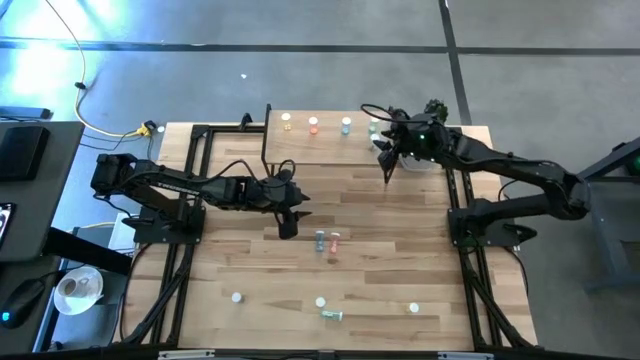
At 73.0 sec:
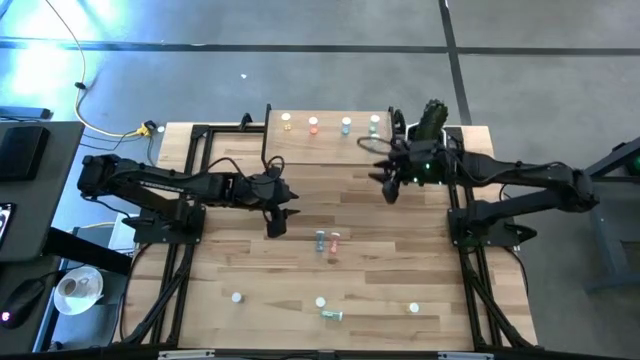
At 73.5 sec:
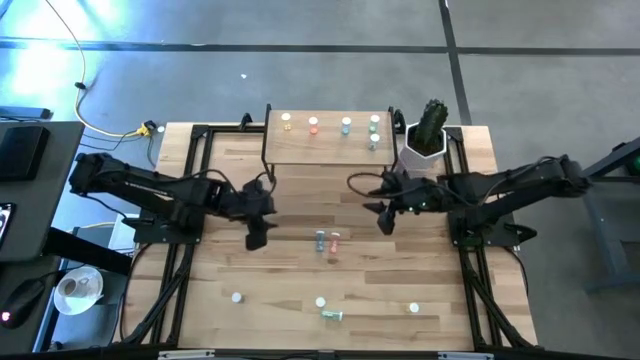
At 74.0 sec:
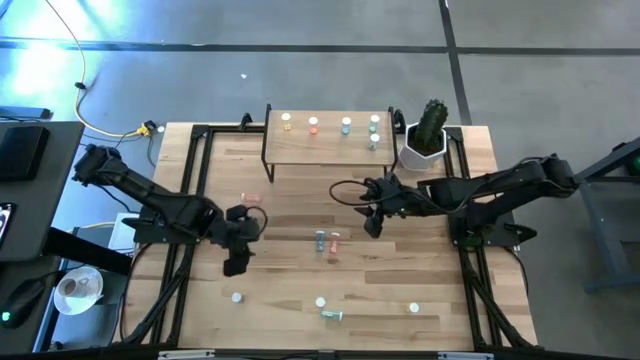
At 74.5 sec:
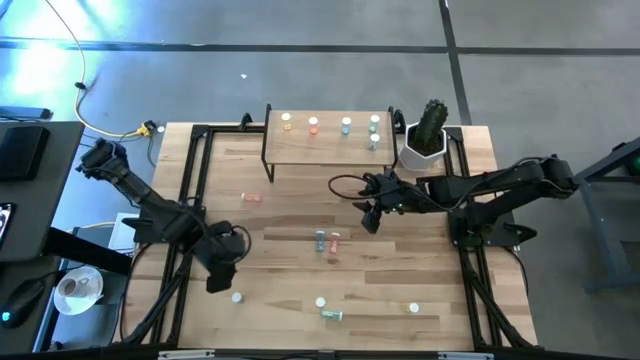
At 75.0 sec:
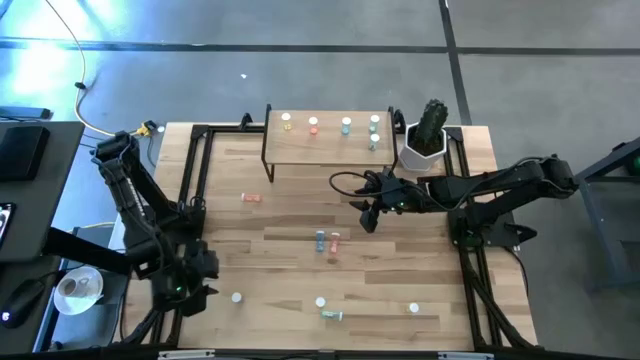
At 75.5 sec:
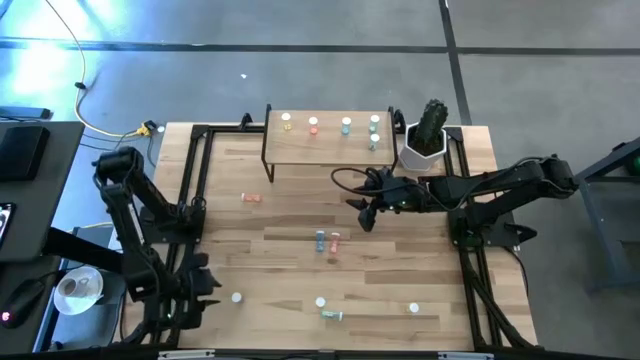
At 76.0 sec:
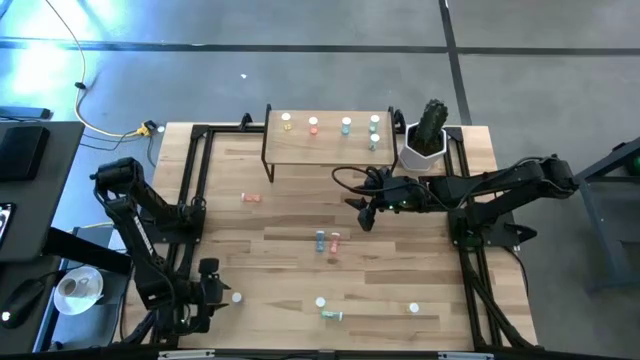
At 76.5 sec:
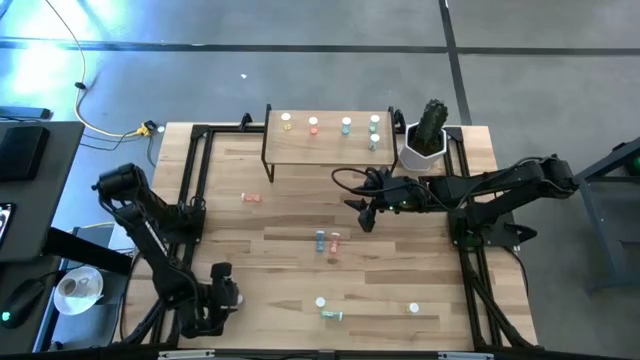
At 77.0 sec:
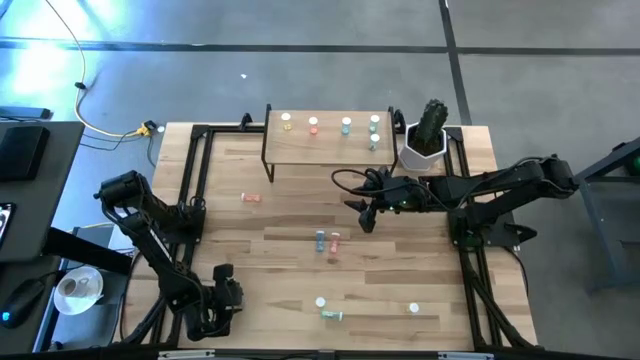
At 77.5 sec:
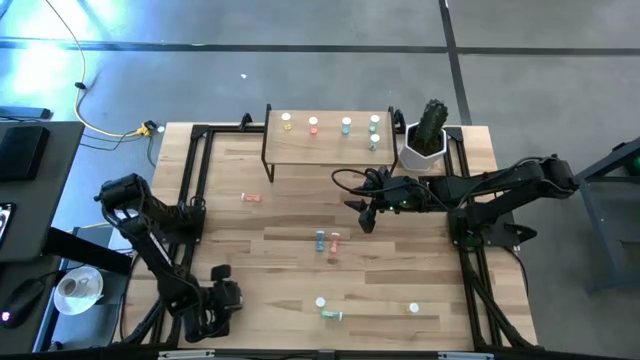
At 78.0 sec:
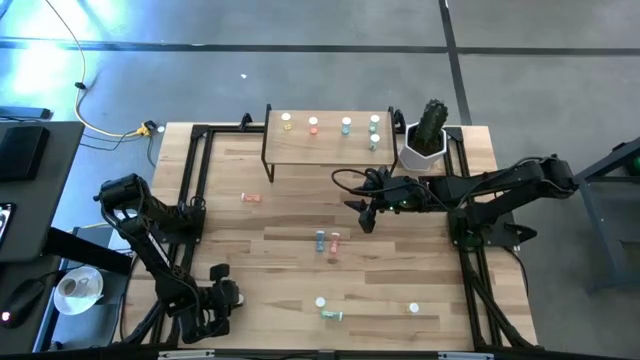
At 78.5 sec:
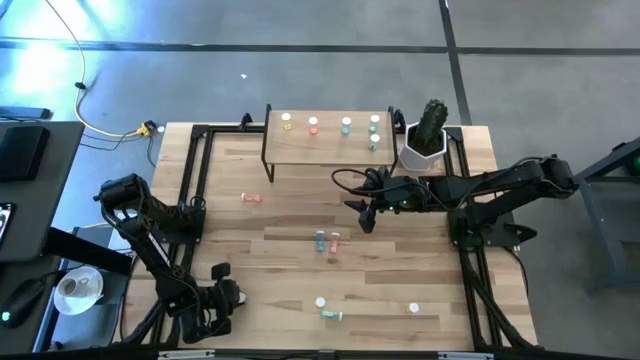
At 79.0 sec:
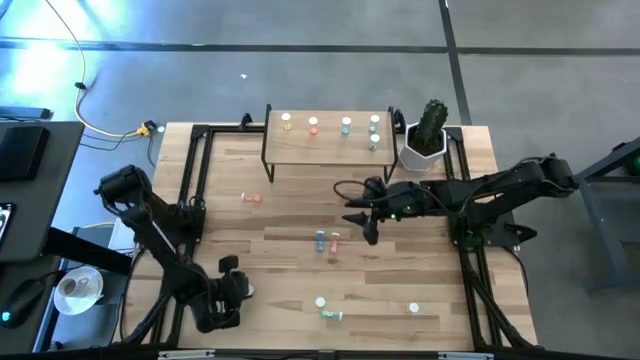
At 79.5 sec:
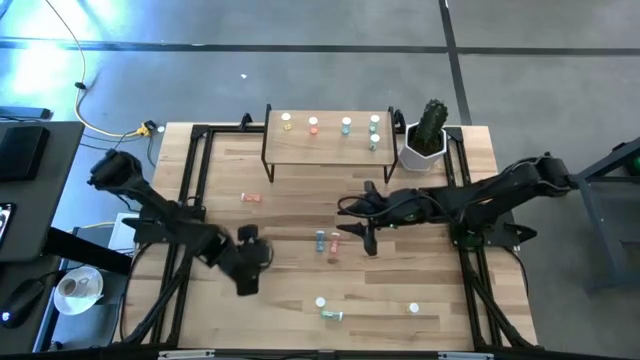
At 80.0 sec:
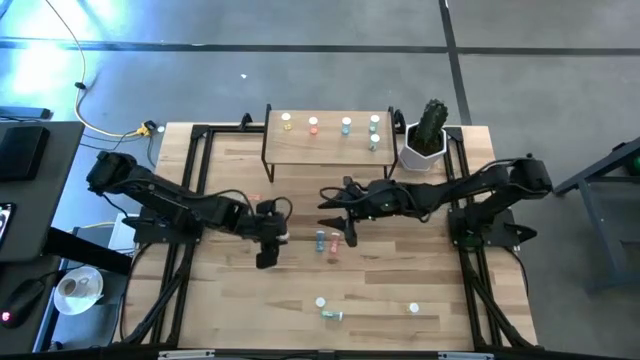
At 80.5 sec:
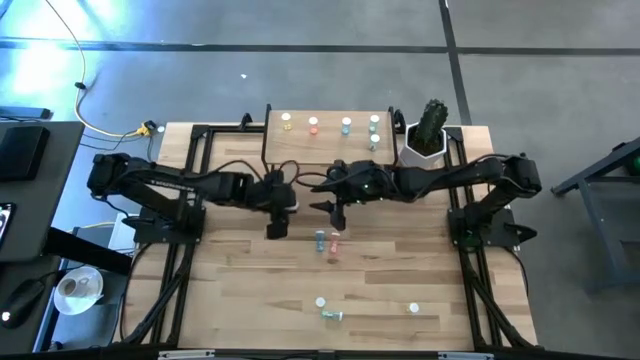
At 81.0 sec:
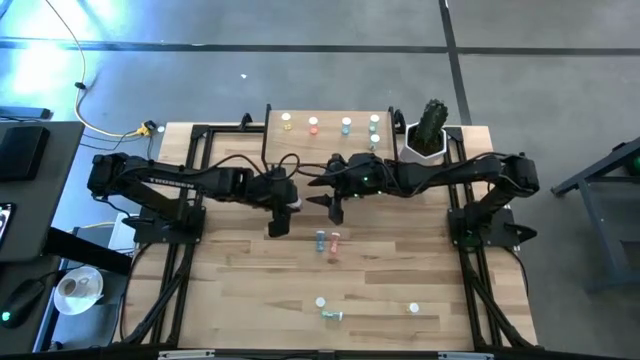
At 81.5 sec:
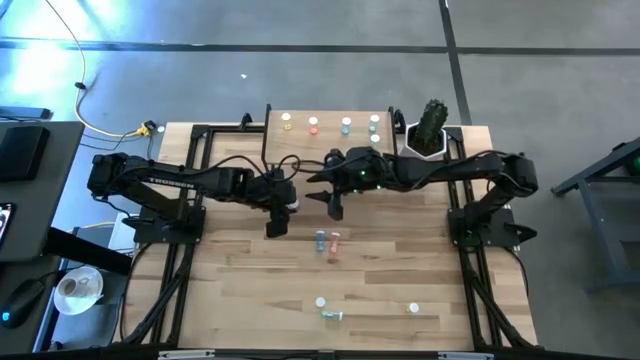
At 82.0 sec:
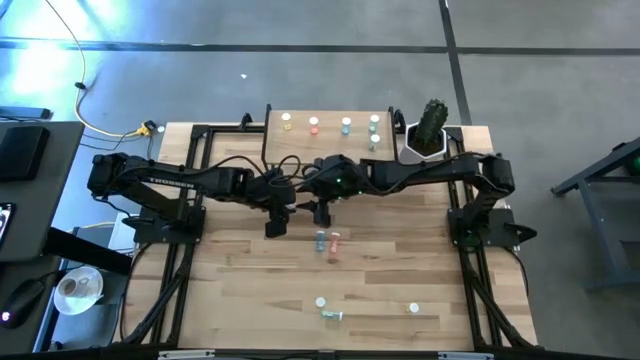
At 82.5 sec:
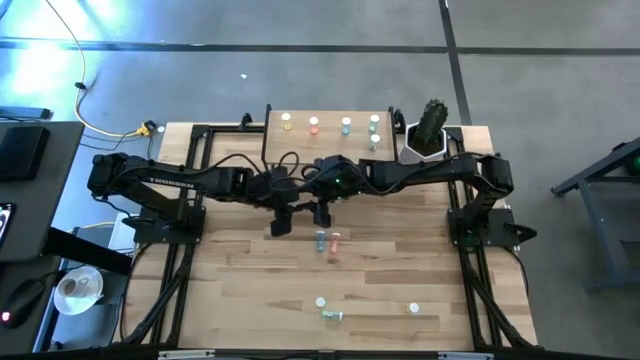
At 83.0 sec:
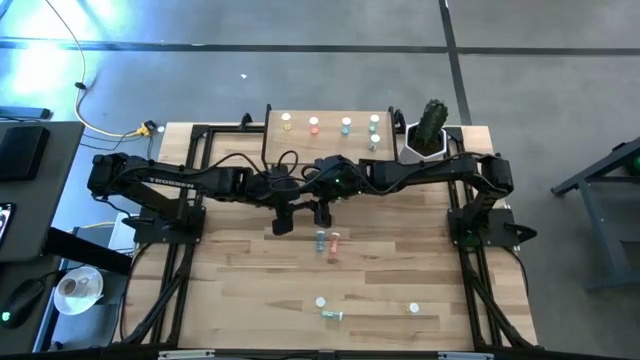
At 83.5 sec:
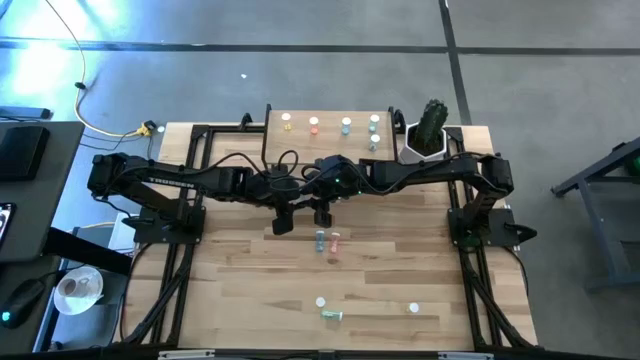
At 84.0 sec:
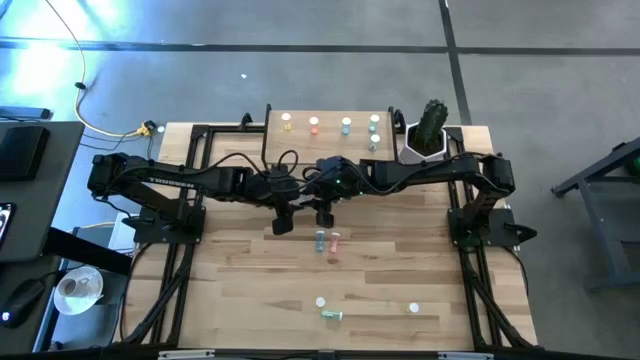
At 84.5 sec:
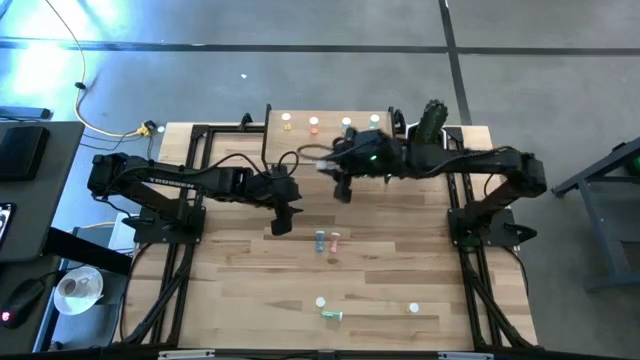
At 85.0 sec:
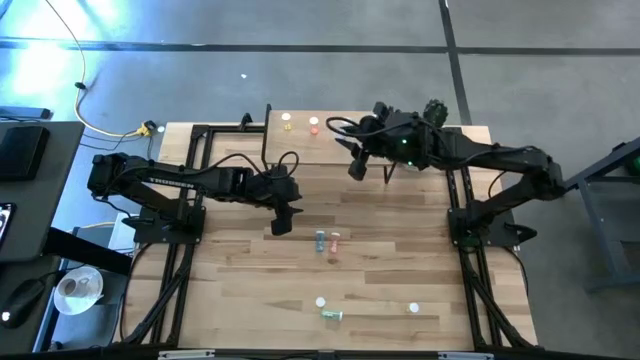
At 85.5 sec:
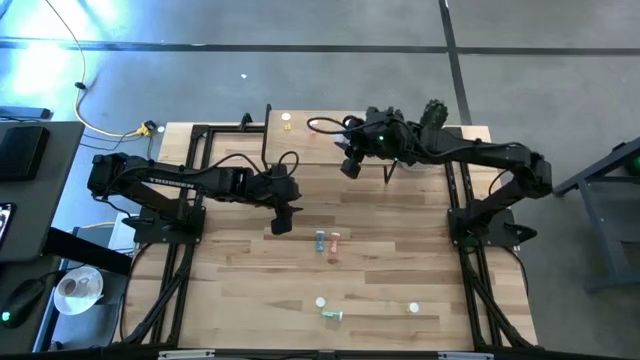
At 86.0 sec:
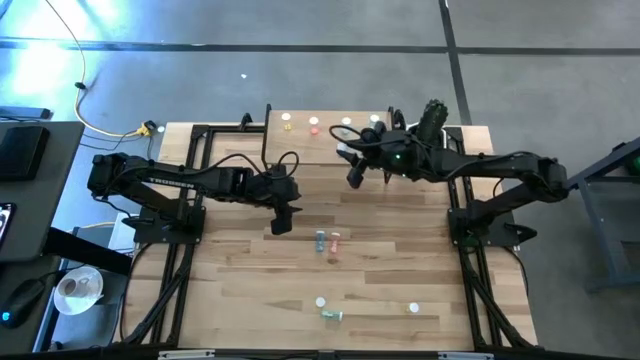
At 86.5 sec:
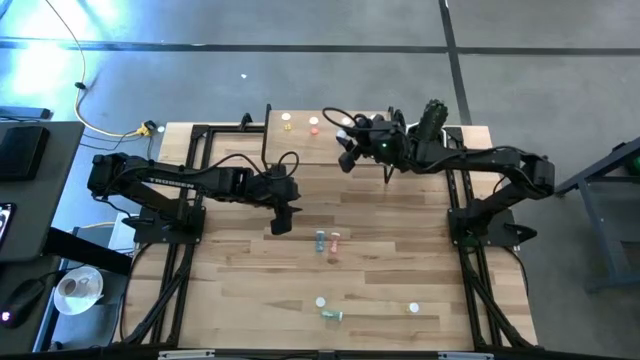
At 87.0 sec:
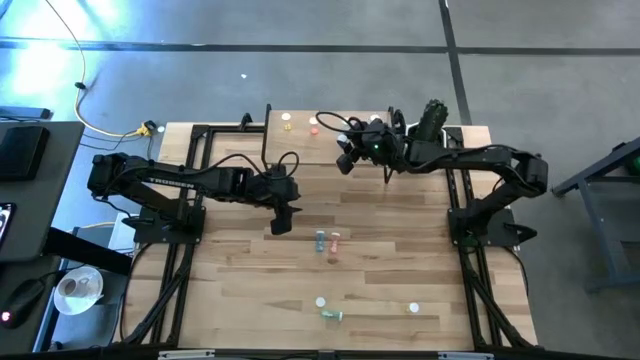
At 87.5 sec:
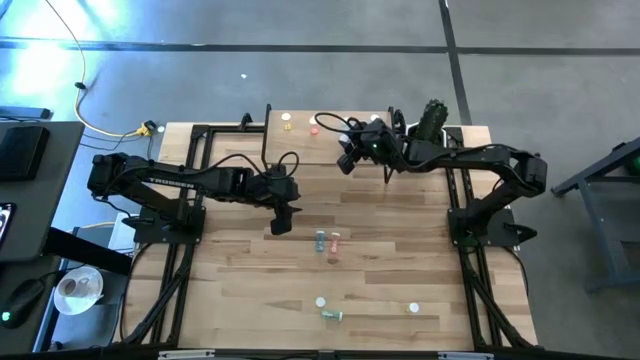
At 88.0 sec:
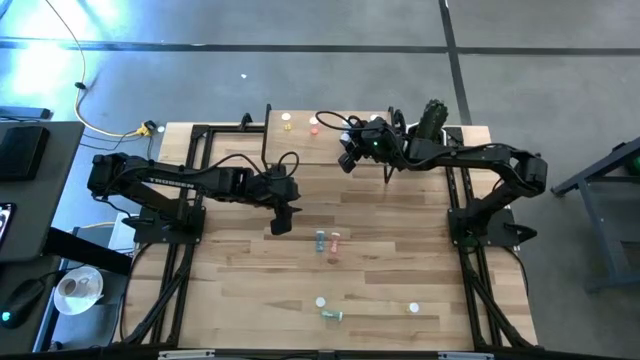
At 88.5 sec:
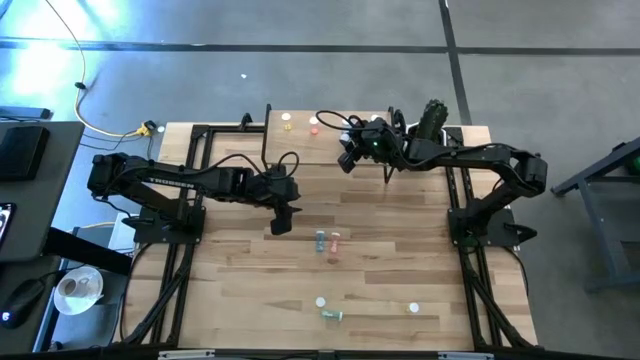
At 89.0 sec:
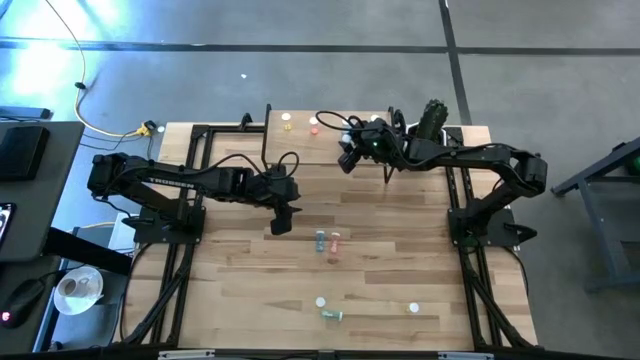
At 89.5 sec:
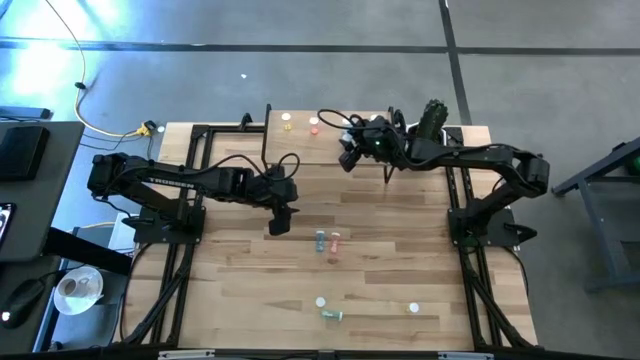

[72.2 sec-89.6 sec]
Task: Pick and place medicine bottles onto shelf by color
Put the left blue pill bottle on the shelf aligned with the other blue pill bottle

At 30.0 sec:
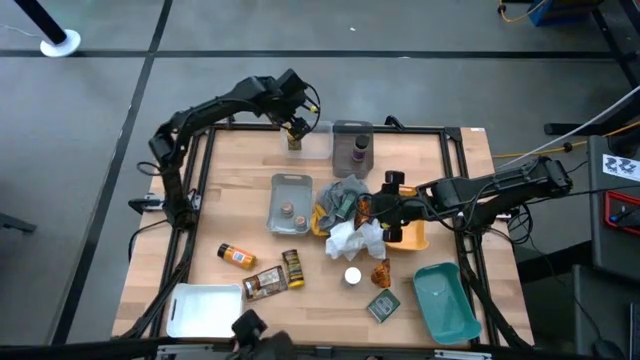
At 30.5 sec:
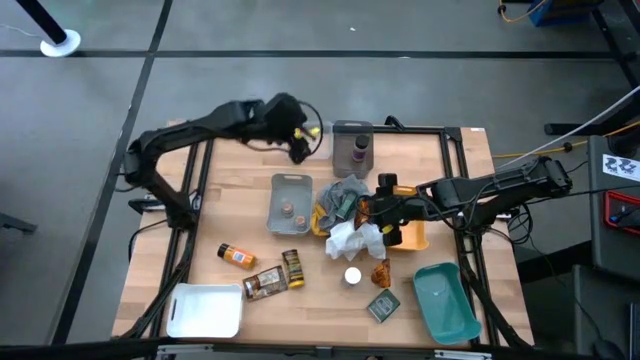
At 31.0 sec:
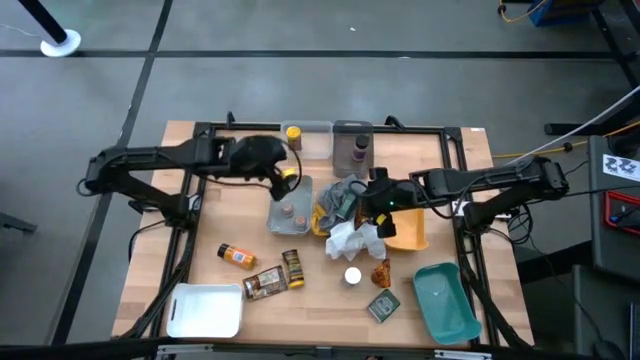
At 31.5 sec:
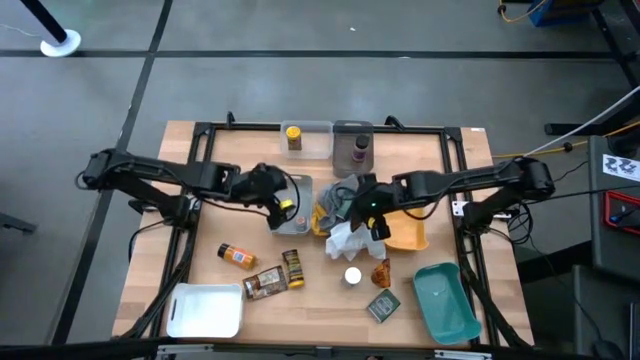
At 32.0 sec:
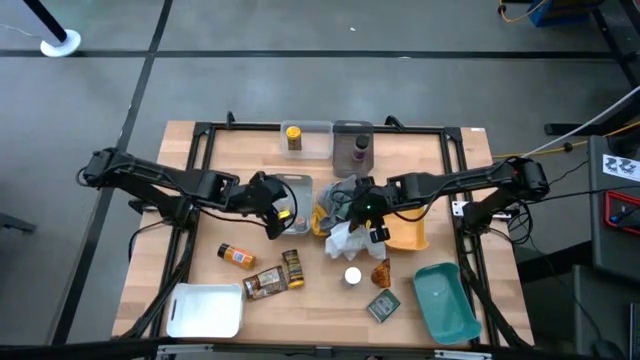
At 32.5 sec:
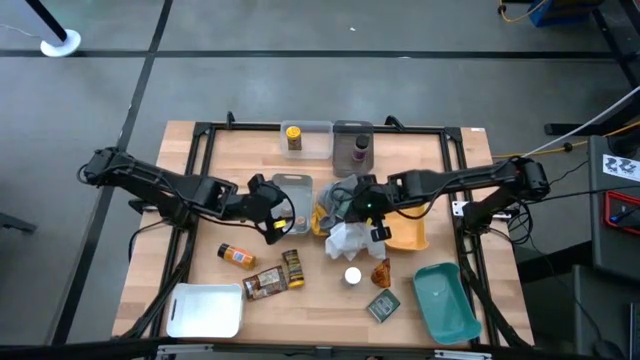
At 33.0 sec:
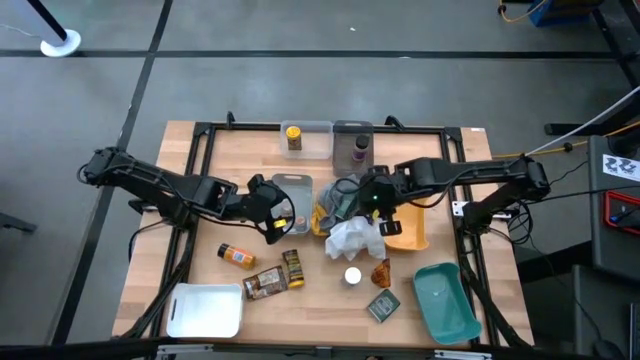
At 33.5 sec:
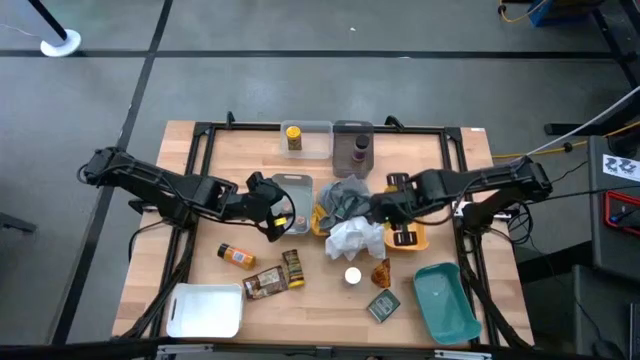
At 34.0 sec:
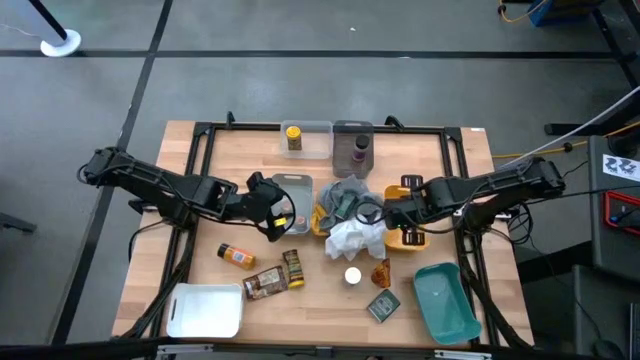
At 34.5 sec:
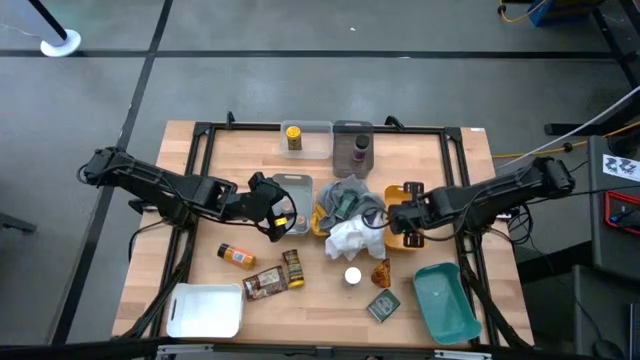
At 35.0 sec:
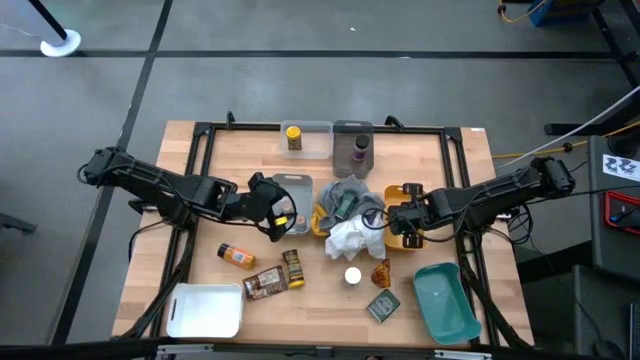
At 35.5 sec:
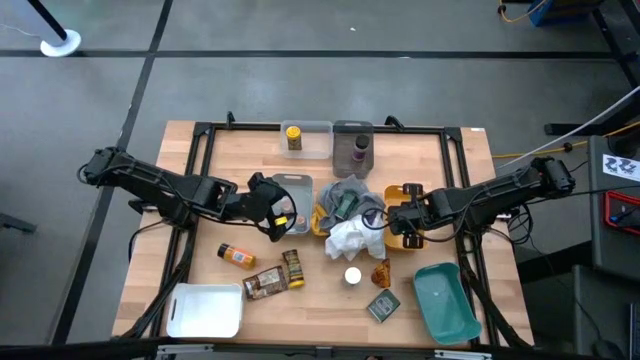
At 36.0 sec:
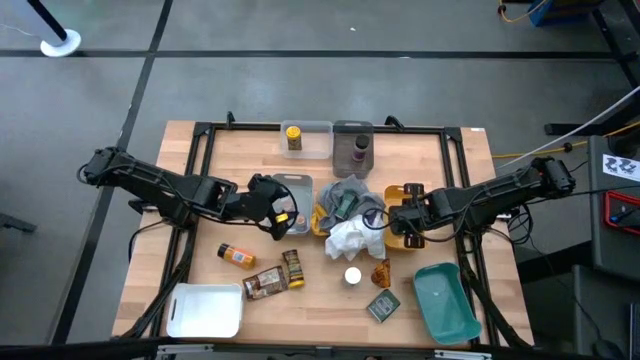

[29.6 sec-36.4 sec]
Task: Sort spices by type
Put the top orange seasoning pack into the yellow bin
